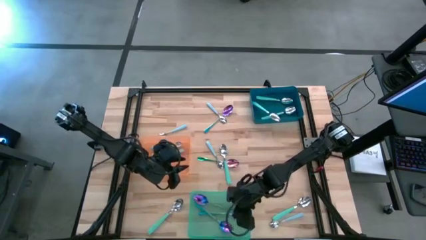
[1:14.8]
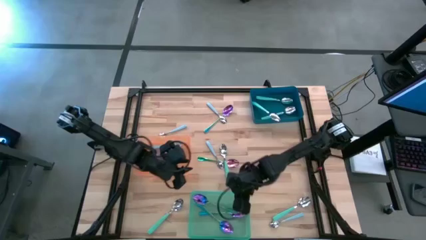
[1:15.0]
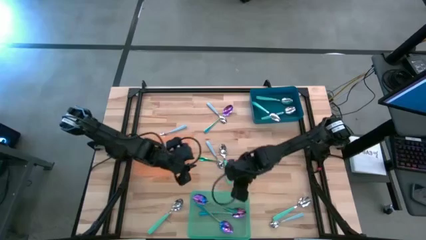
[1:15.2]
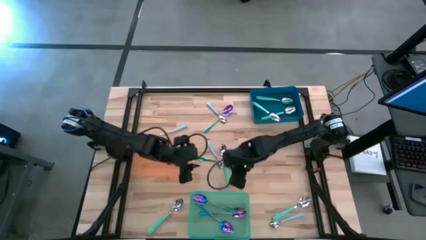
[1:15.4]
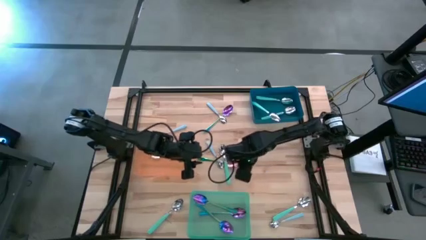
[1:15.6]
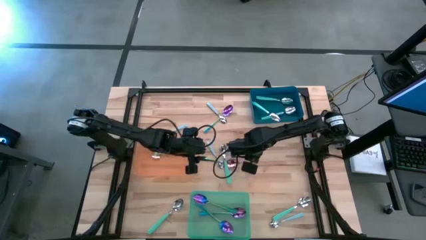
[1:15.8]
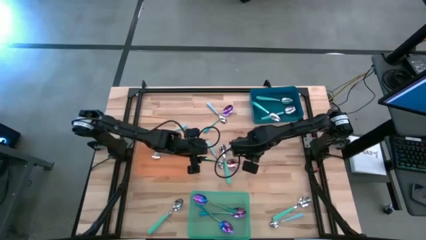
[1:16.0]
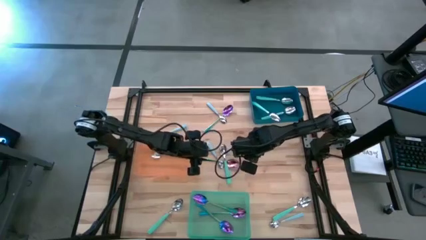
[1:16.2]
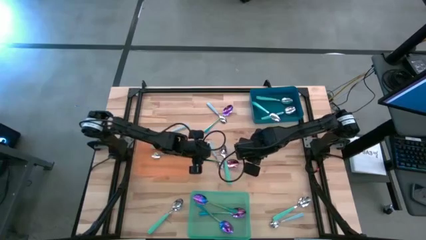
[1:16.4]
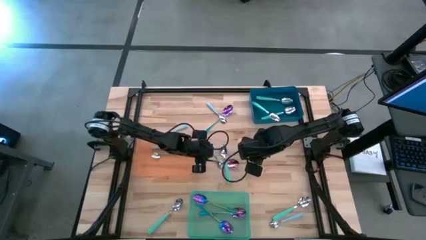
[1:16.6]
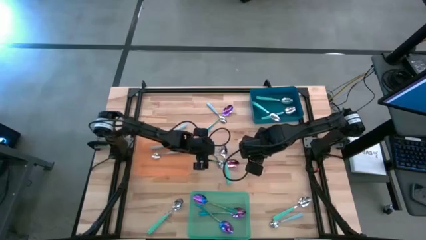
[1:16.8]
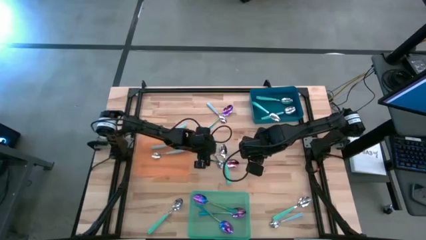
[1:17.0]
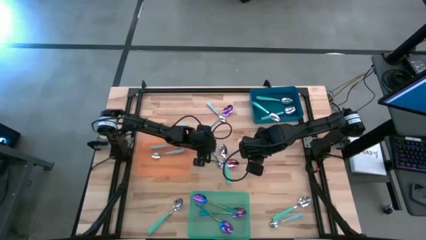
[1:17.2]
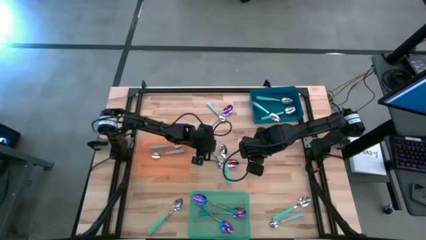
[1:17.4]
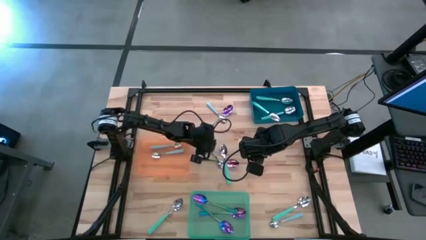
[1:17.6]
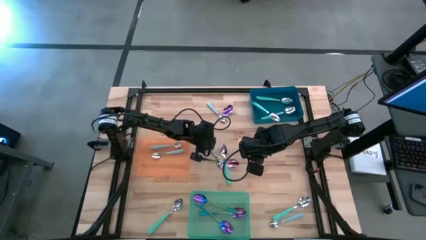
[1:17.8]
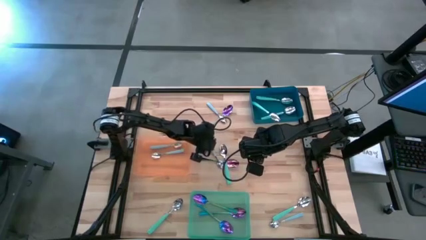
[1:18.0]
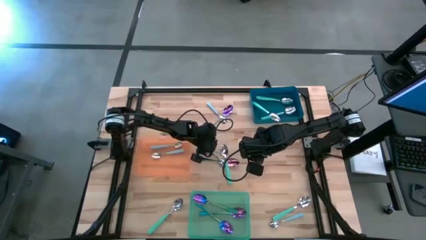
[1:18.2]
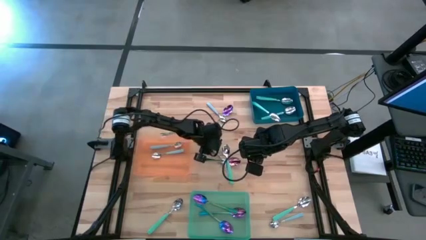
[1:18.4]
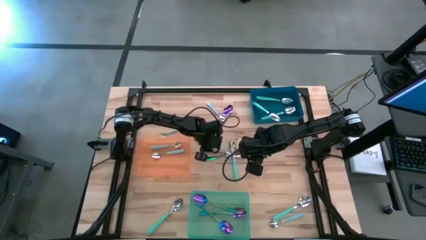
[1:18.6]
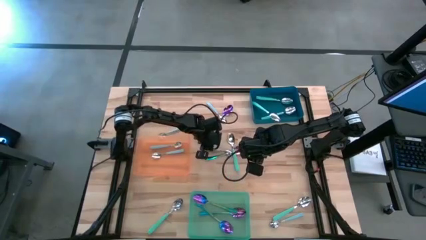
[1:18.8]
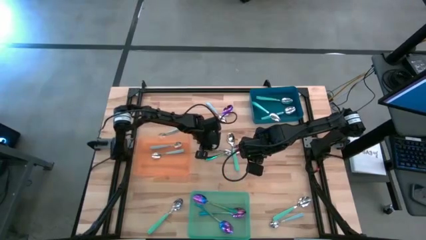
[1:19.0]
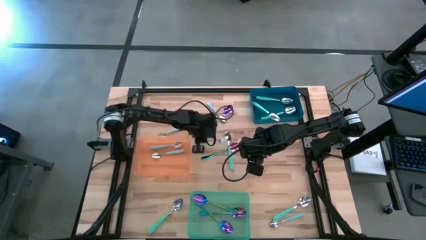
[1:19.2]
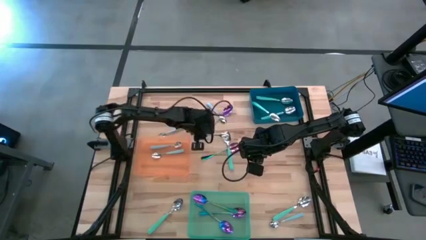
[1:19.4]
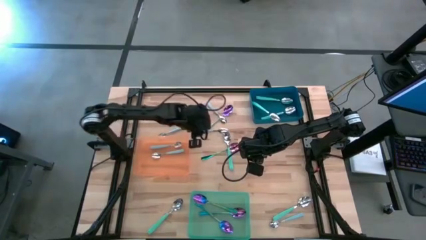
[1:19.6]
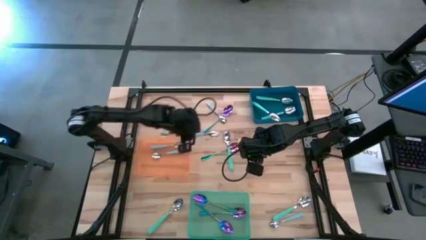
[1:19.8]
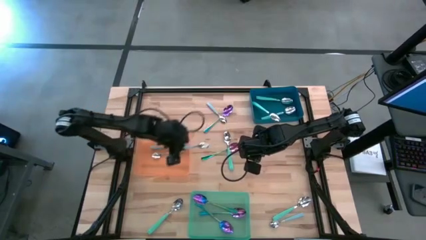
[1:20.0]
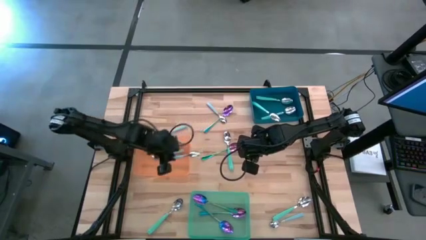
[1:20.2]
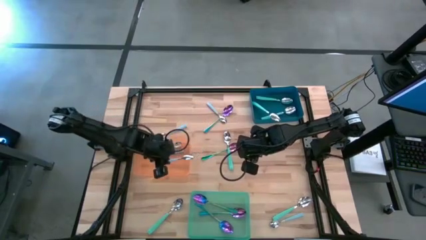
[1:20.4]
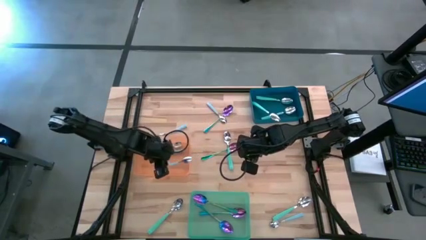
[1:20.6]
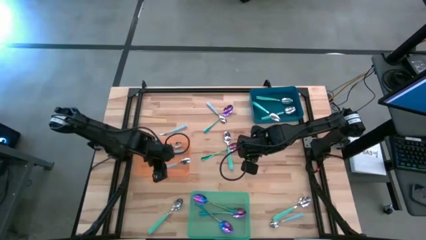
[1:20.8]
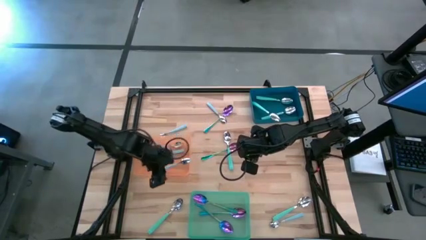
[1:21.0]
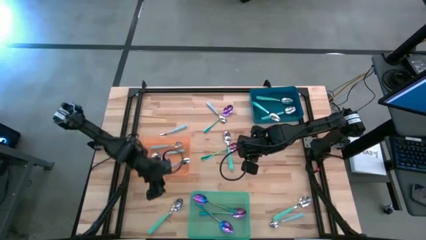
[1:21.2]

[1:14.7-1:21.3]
Task: Sort silverware by color (type)
Put the middle blue spoon into the orange bin

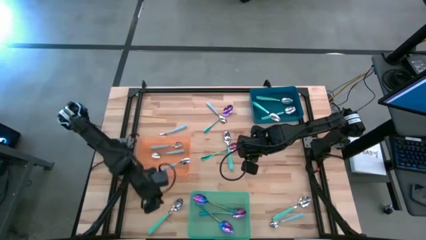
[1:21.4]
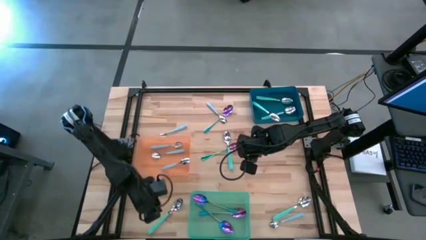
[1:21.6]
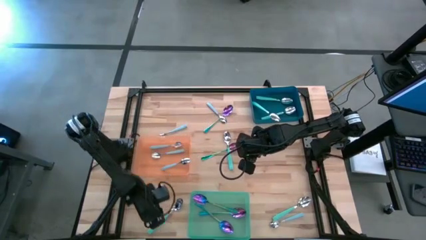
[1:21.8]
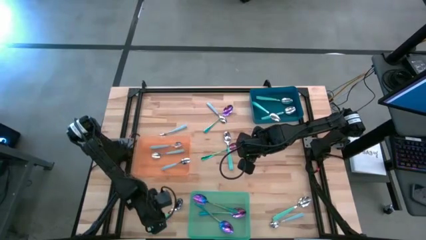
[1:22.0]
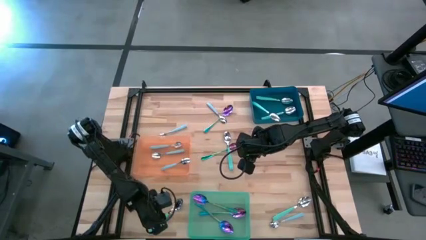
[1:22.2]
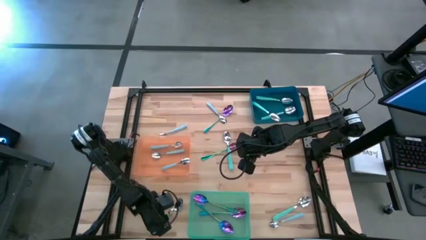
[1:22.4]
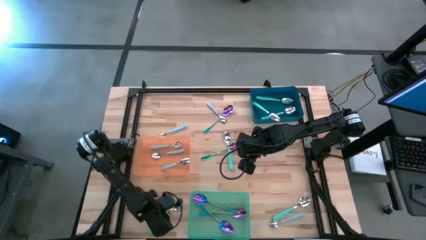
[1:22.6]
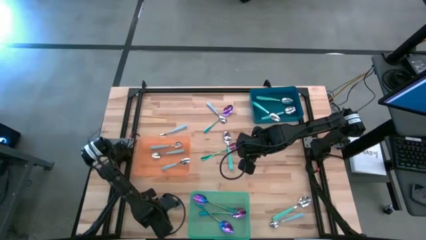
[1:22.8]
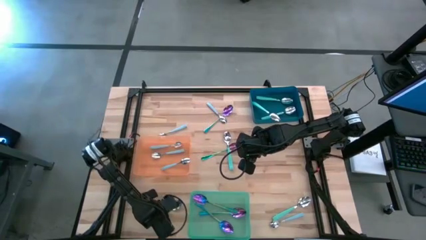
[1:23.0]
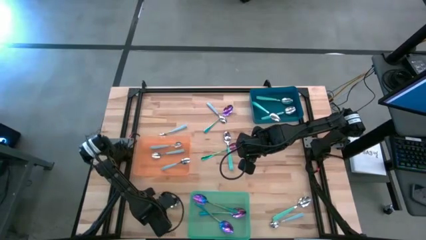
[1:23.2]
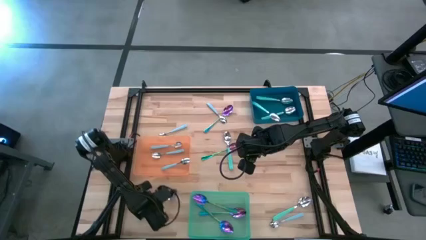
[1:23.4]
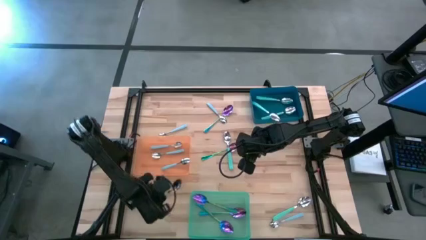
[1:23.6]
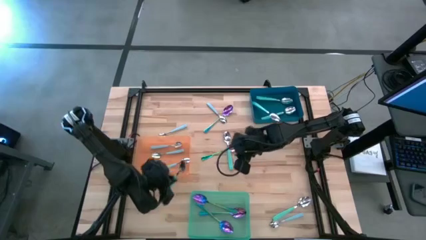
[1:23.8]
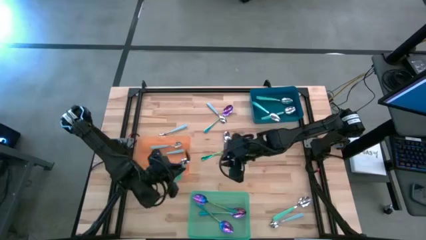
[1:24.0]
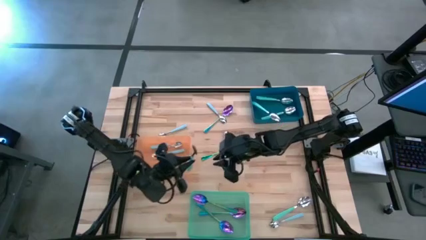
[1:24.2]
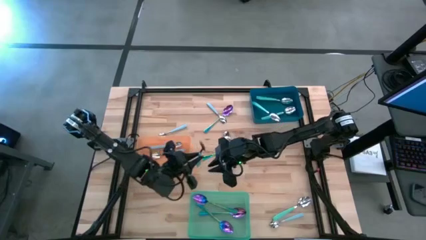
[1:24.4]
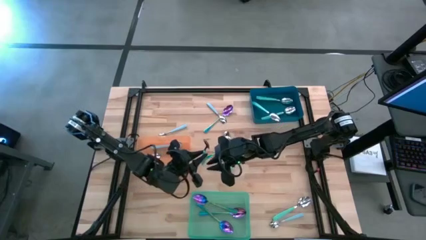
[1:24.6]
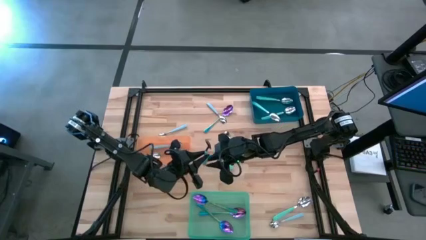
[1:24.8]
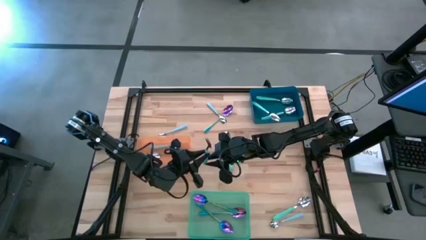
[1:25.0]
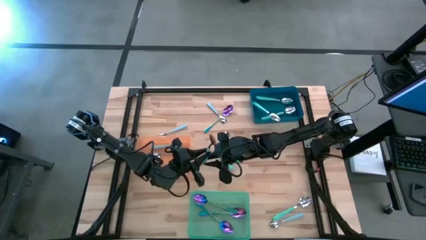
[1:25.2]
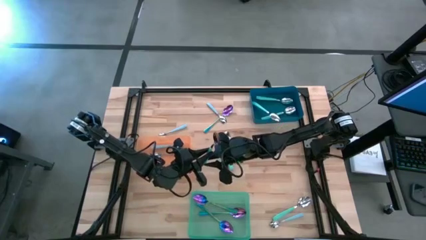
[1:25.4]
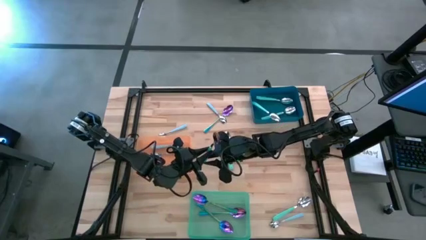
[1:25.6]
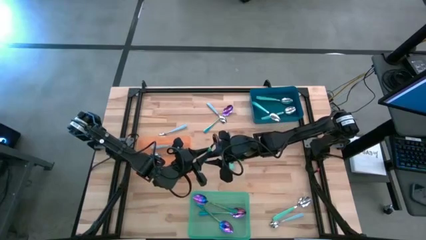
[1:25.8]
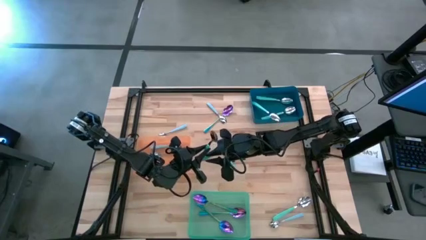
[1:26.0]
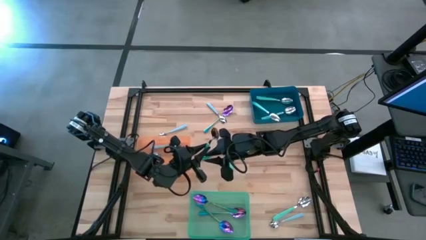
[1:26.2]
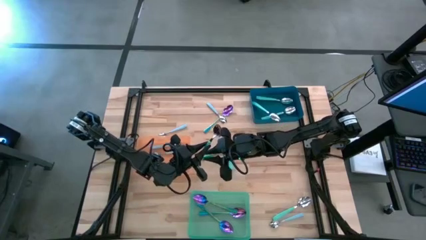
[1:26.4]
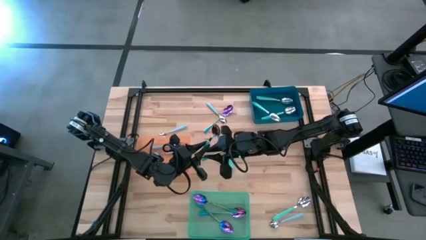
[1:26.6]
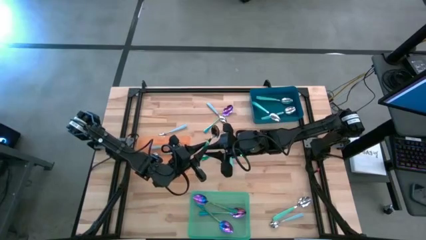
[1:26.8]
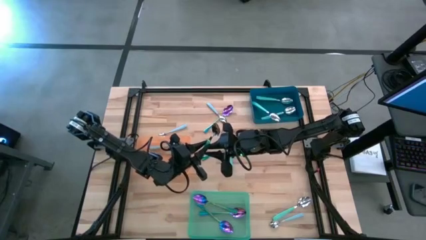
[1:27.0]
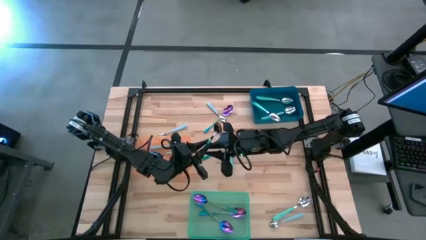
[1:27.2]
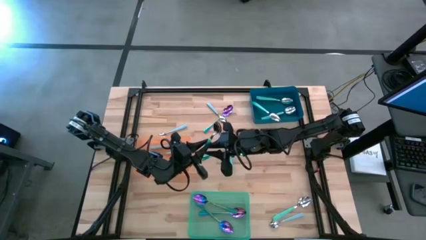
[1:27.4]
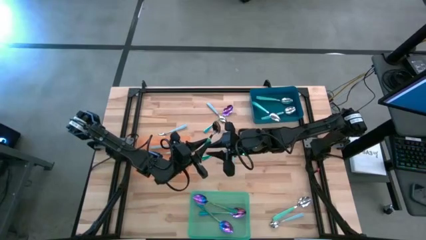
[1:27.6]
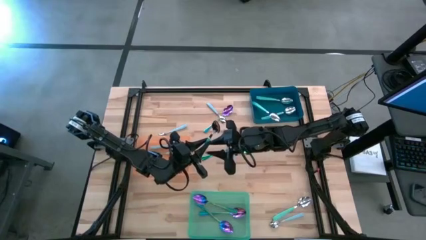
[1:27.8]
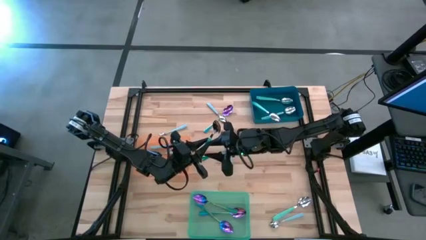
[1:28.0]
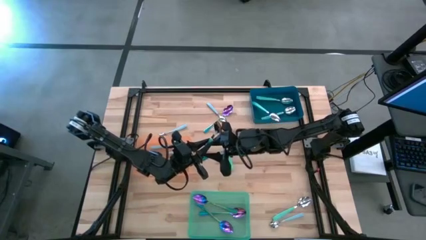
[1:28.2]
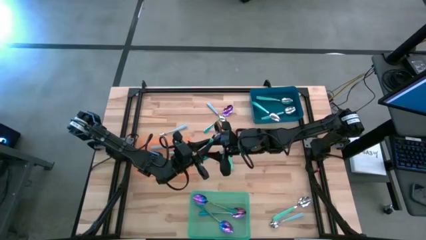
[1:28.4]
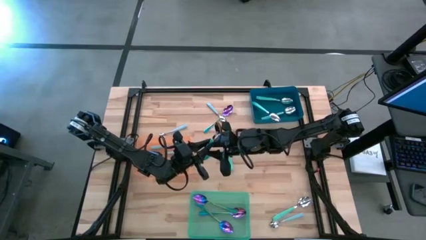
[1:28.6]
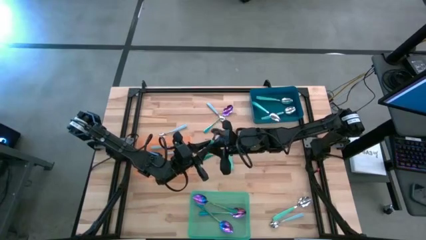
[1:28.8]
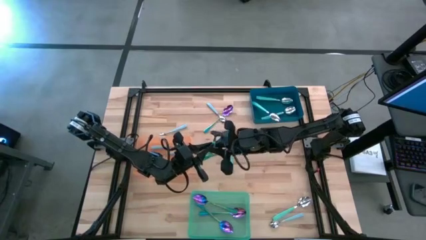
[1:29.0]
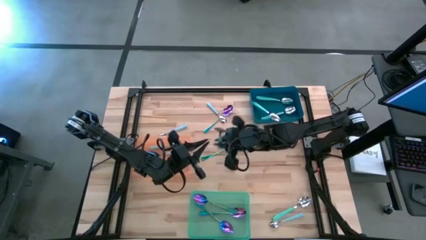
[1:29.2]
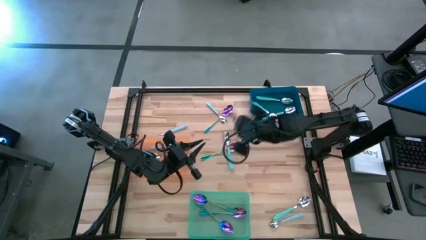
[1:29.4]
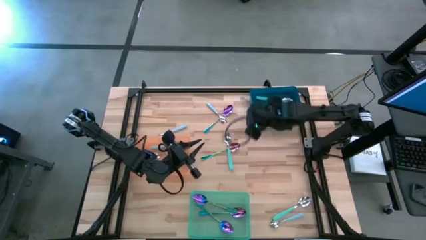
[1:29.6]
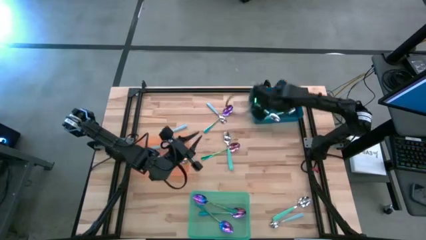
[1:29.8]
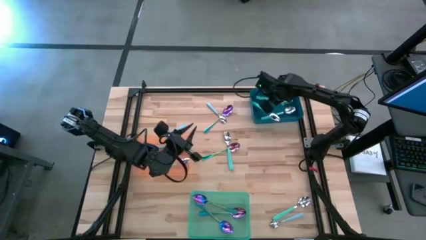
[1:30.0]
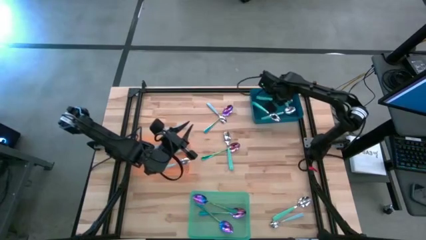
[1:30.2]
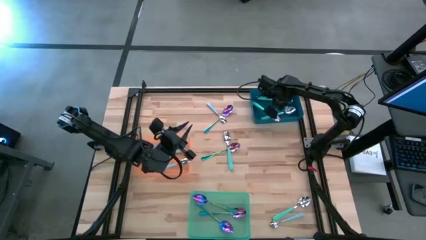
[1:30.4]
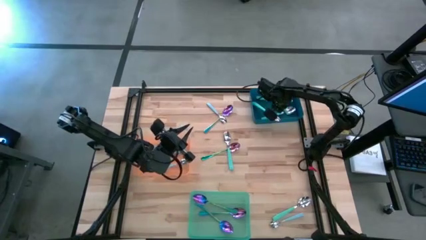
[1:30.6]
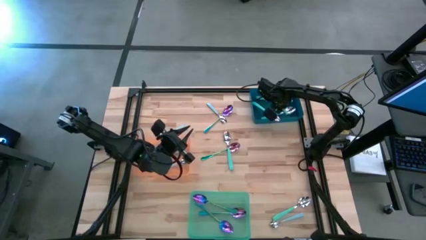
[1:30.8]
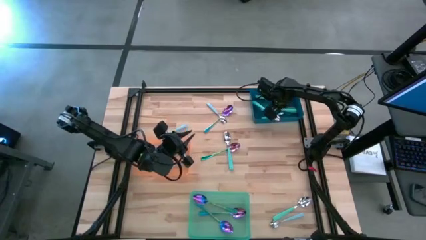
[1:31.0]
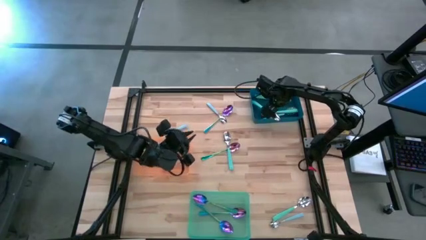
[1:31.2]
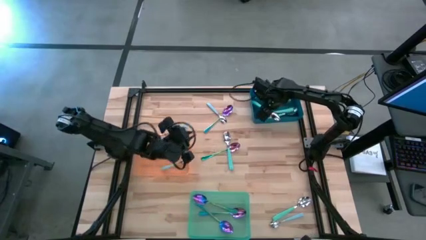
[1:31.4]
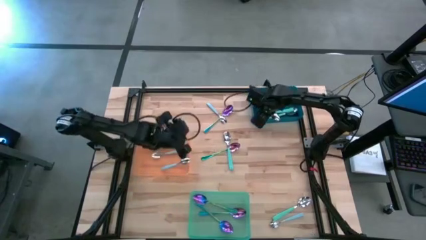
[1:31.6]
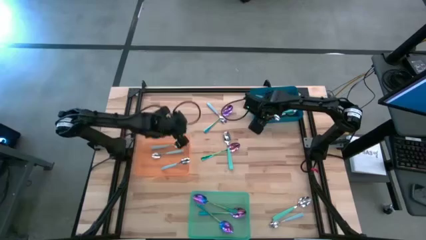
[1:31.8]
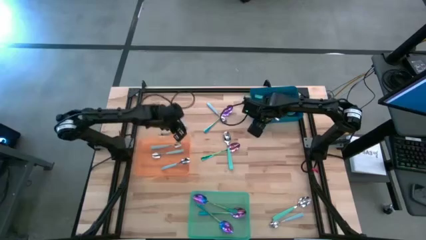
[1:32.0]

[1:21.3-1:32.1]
Put the bottom left green spoon into the blue bin
